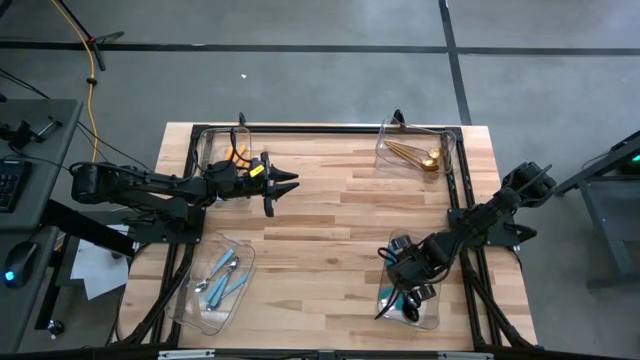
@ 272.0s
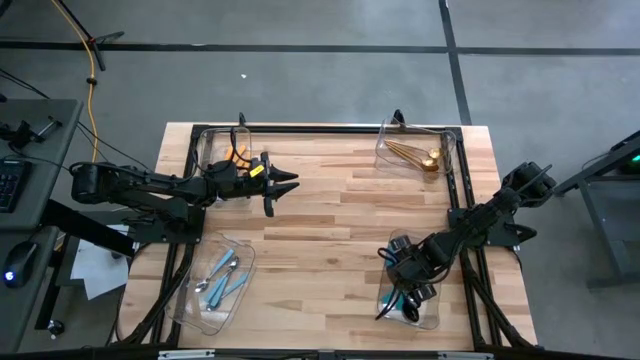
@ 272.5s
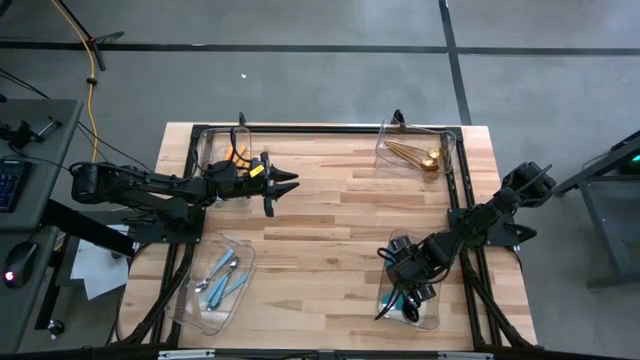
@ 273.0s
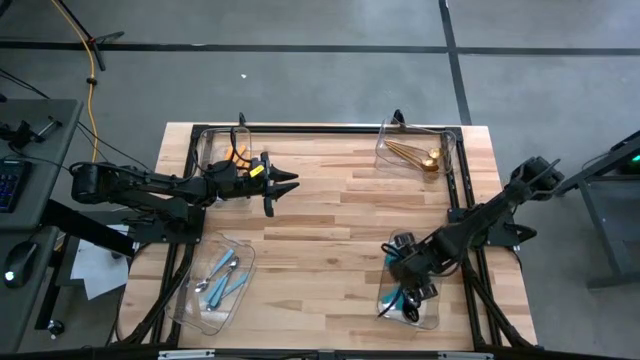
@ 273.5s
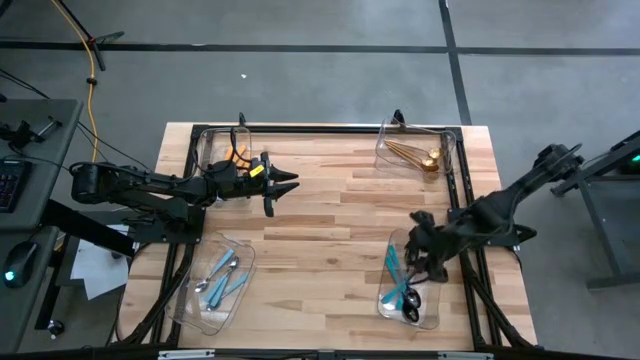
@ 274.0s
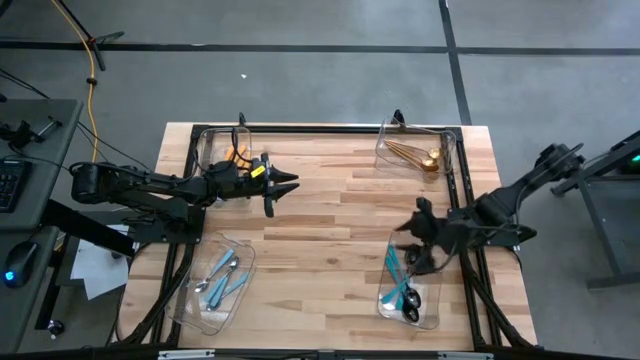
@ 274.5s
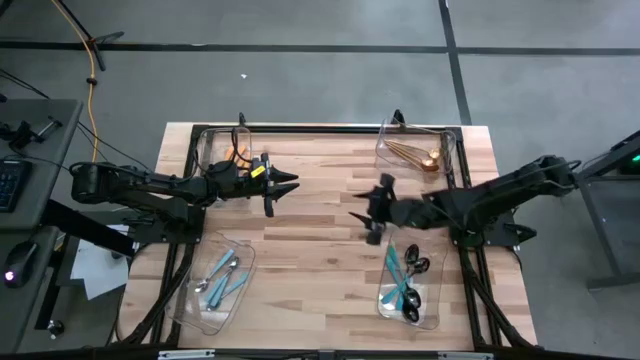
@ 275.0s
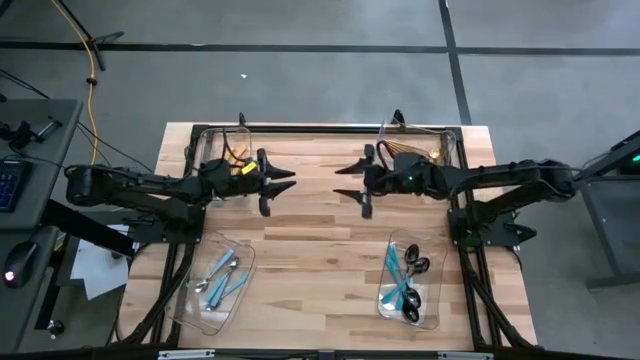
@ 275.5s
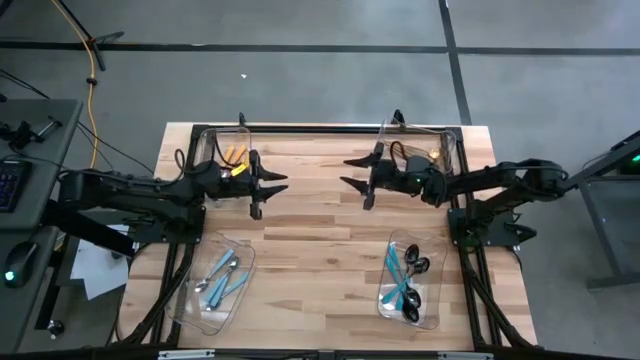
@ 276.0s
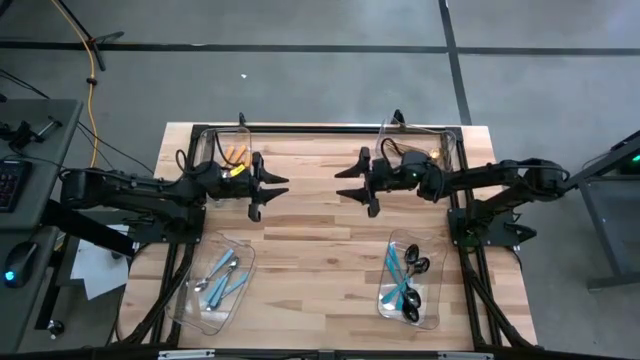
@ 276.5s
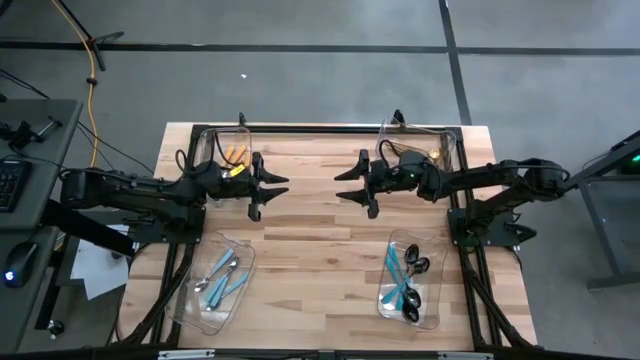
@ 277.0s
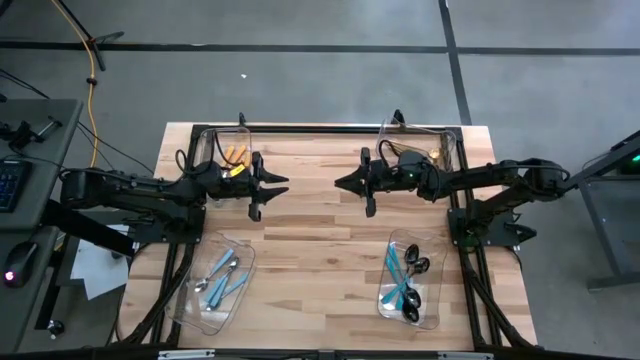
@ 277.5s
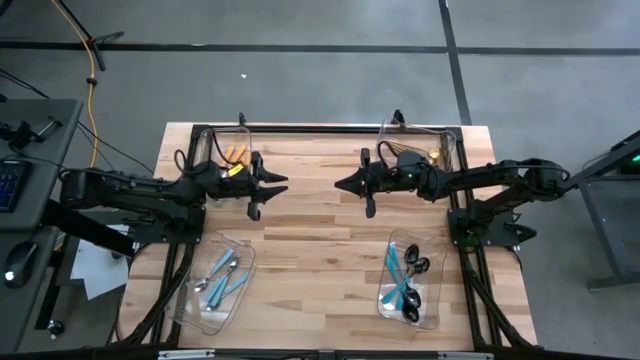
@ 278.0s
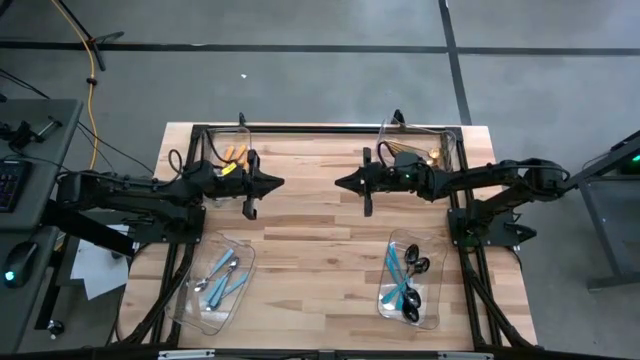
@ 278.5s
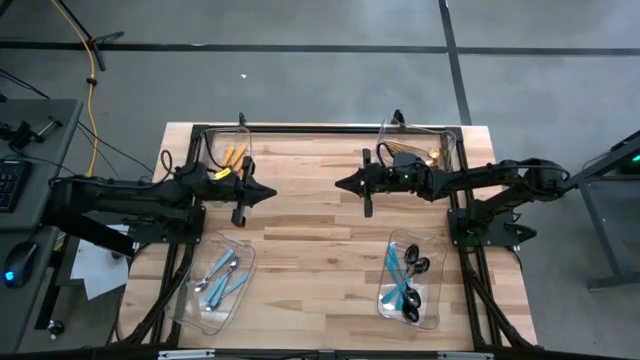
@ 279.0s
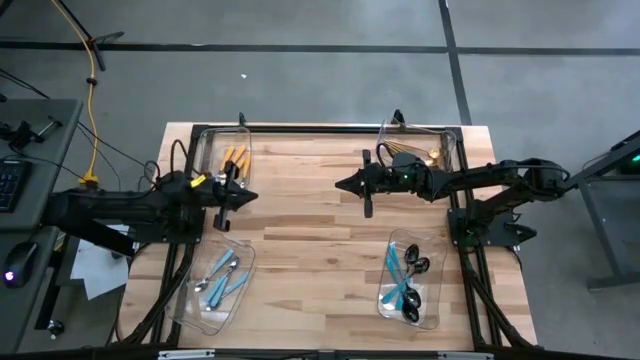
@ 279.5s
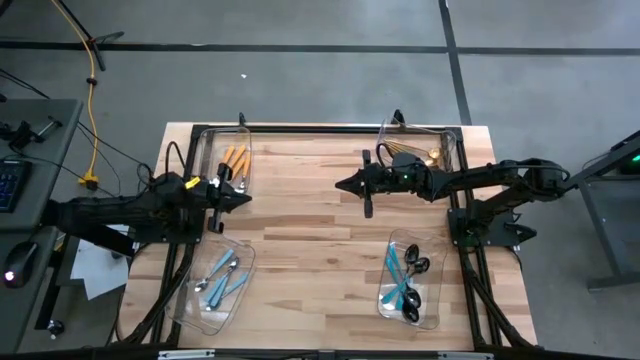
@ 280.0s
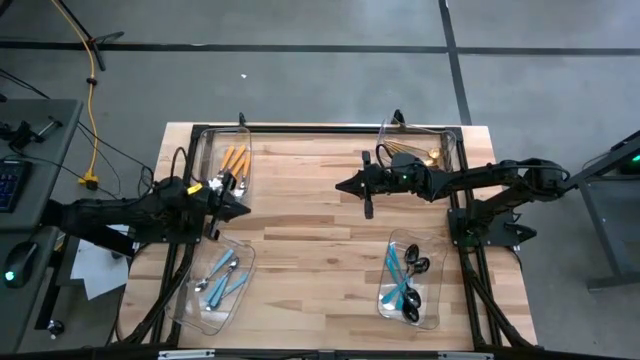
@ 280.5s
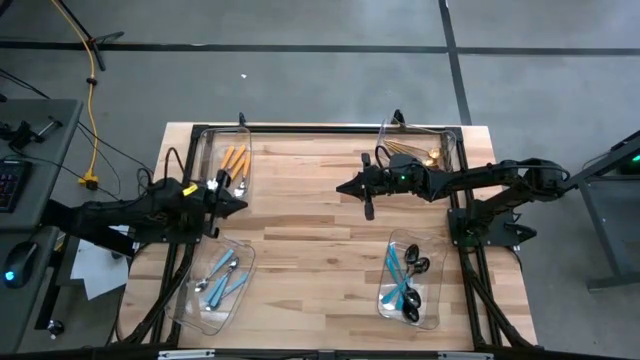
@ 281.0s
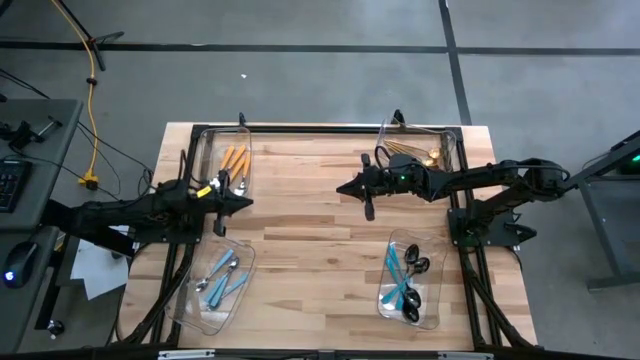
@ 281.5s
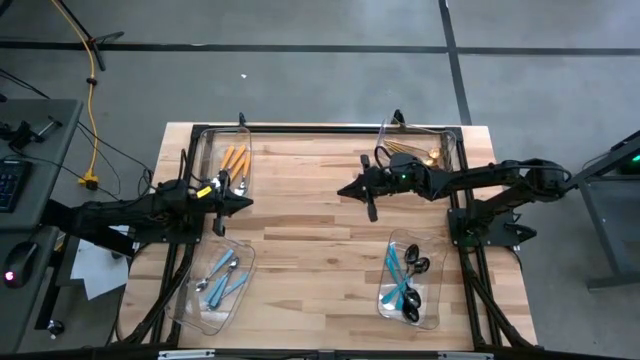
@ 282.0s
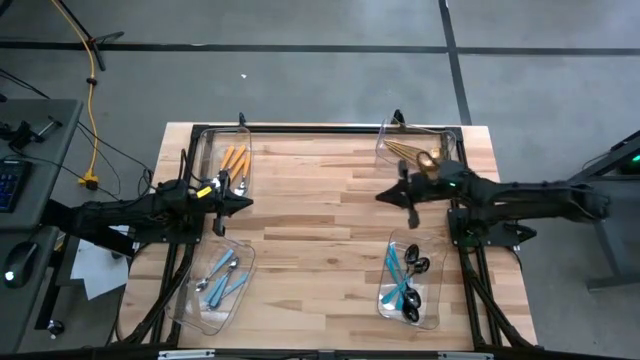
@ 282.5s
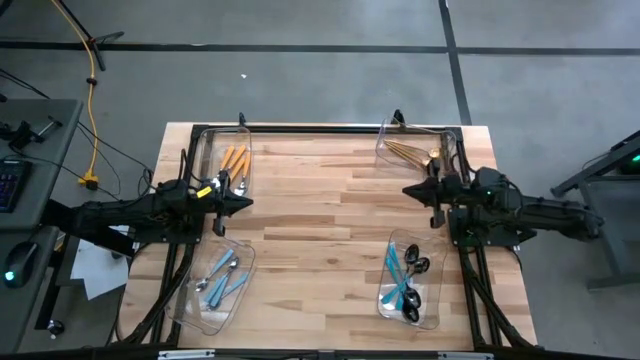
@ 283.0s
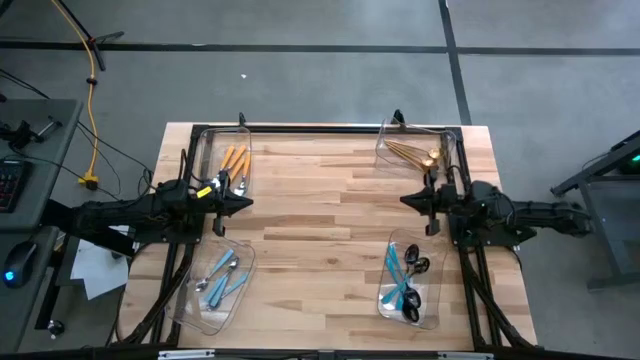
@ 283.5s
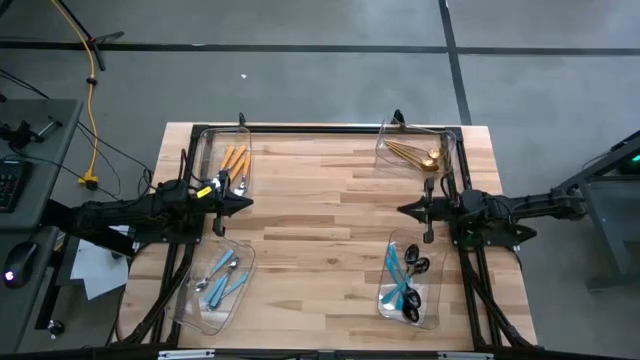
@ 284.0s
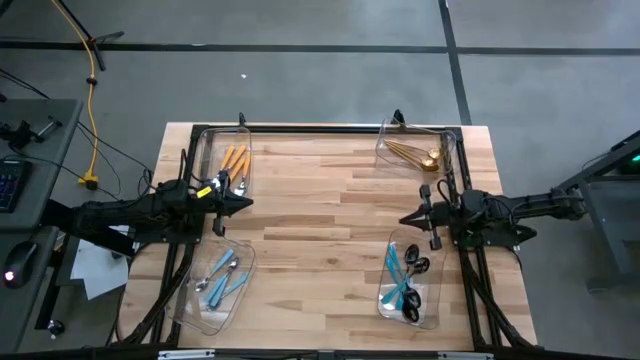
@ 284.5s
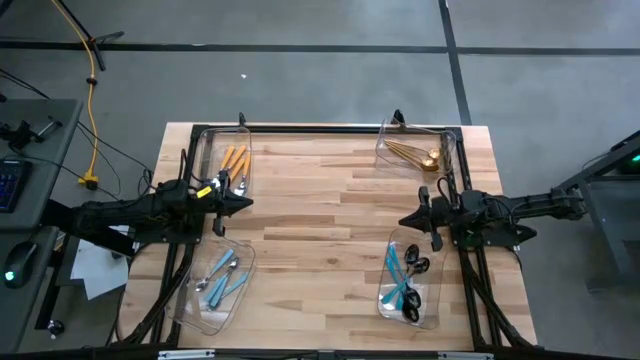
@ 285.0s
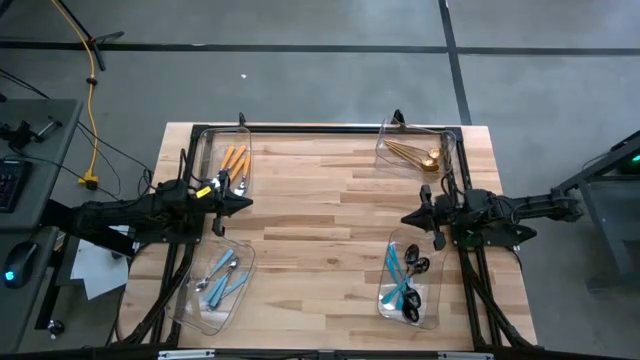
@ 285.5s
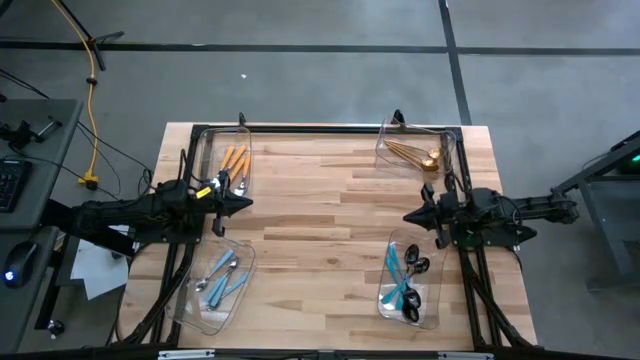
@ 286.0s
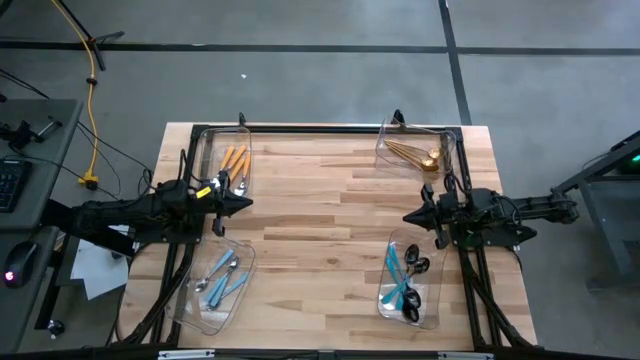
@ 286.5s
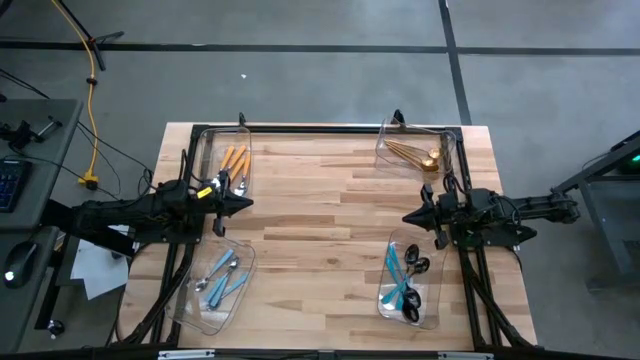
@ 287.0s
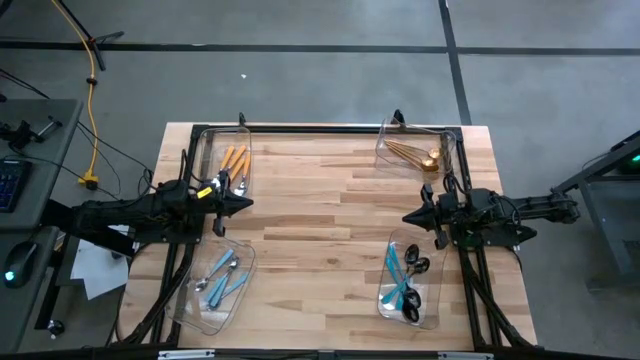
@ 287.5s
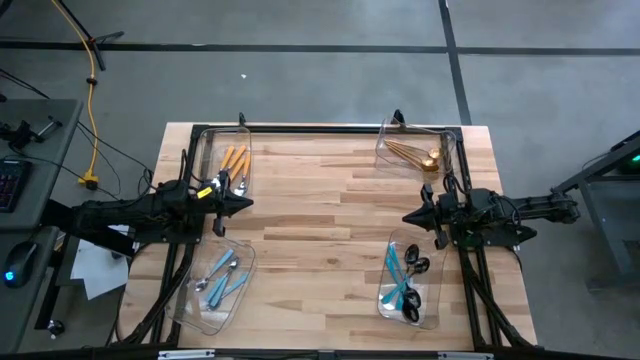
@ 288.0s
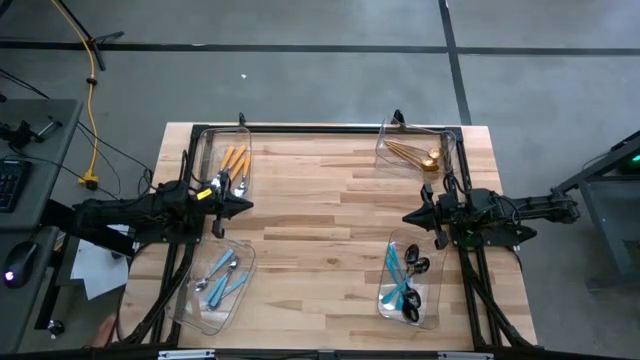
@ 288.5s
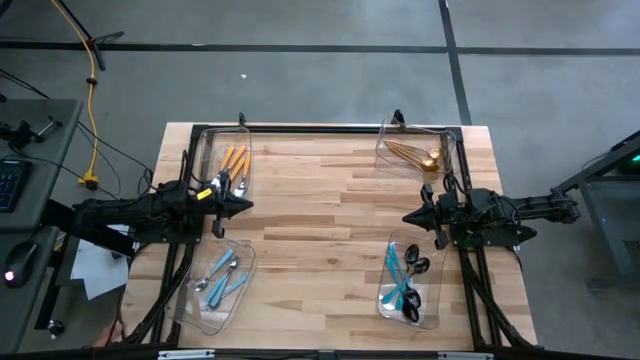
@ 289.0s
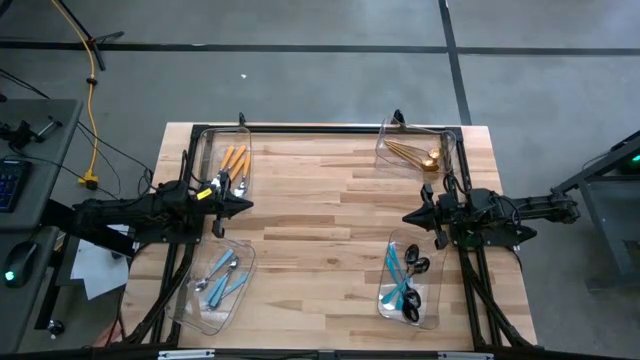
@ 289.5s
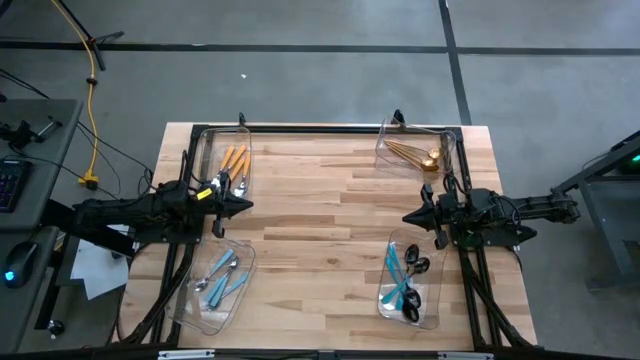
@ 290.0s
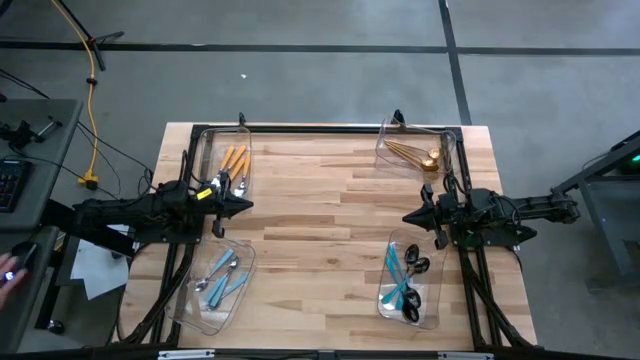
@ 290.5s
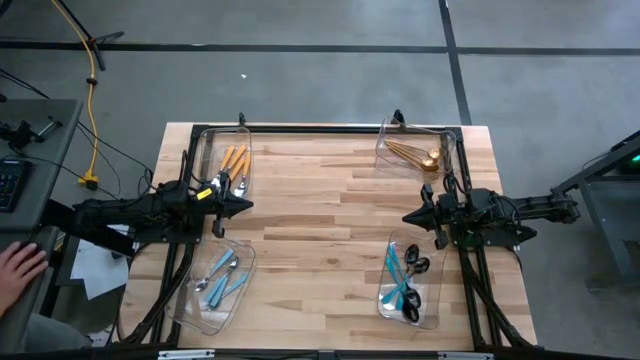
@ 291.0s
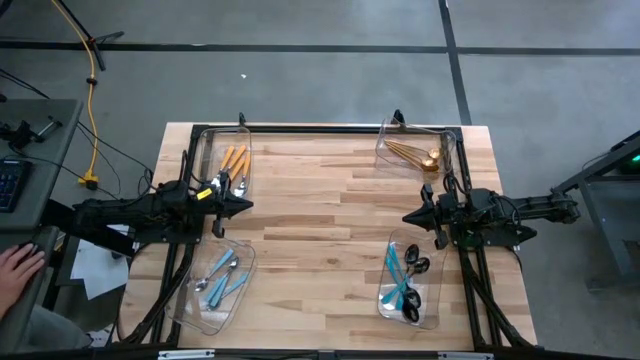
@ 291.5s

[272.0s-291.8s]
Task: Sort silverware by color (type)
Return to Home Position

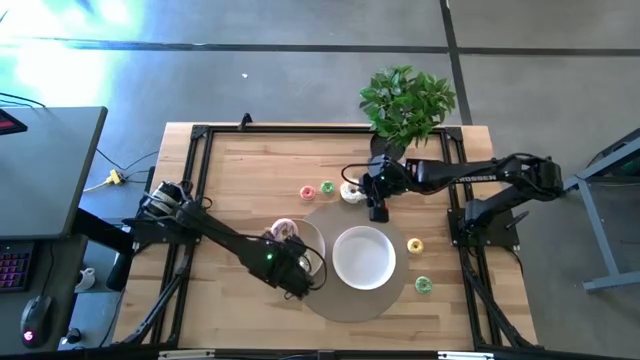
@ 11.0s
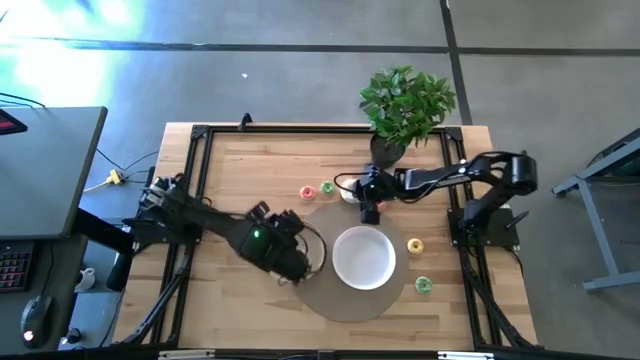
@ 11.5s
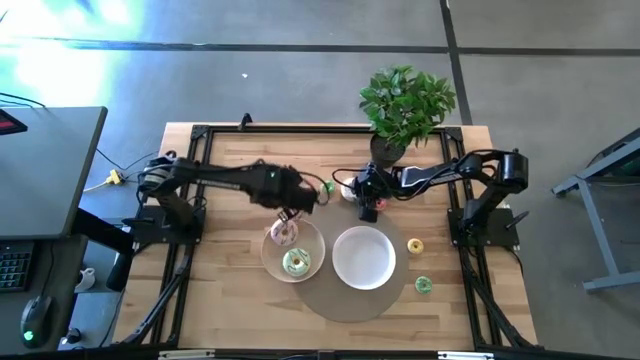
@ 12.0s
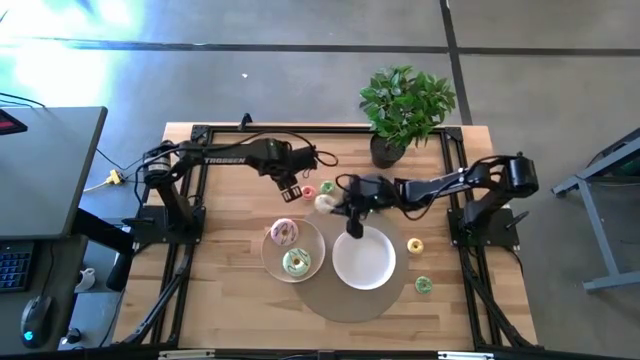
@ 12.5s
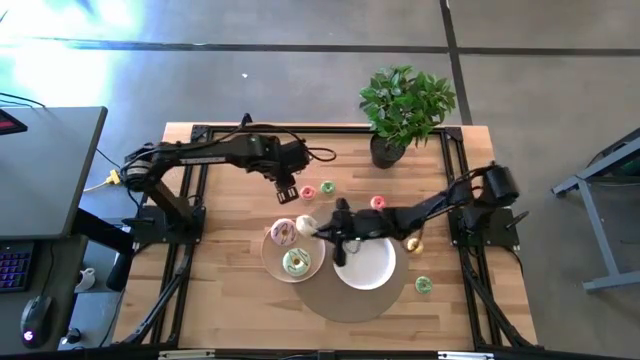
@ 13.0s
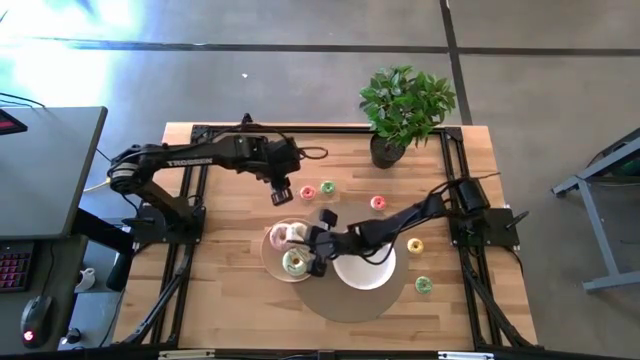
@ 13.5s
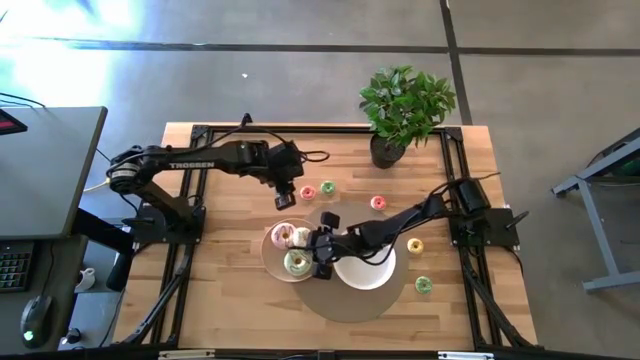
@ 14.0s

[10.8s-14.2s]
Task: Pick & Place donuts
Put the large white donut on the brown plate
